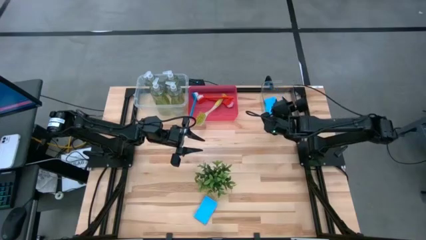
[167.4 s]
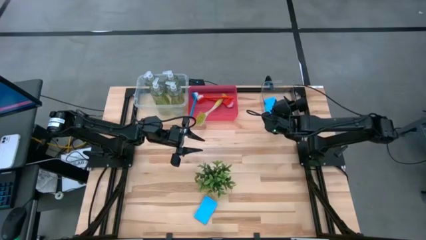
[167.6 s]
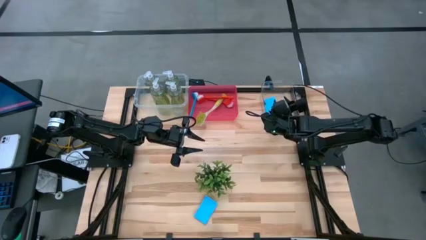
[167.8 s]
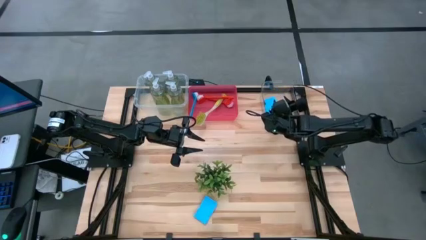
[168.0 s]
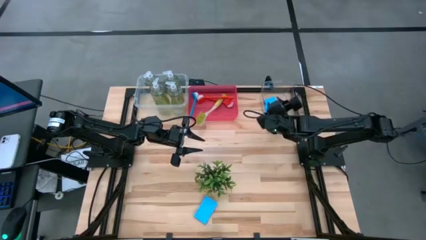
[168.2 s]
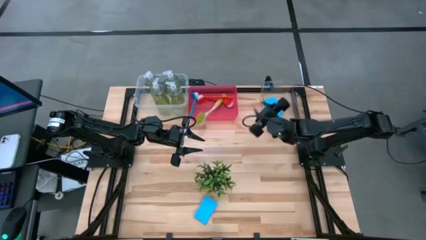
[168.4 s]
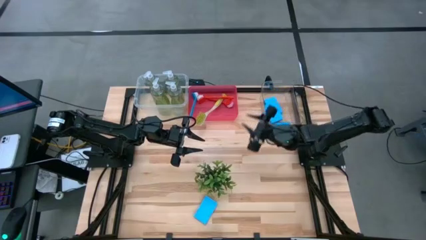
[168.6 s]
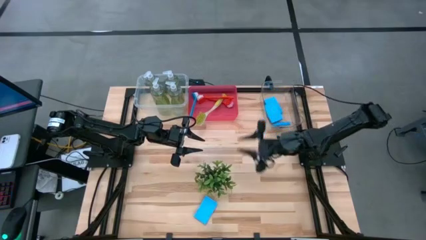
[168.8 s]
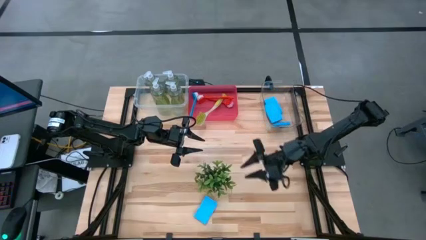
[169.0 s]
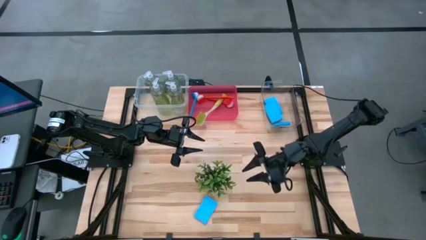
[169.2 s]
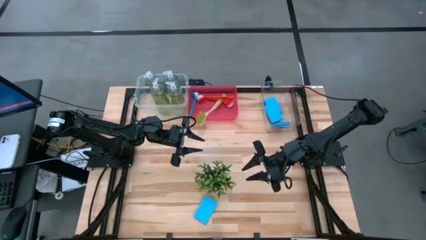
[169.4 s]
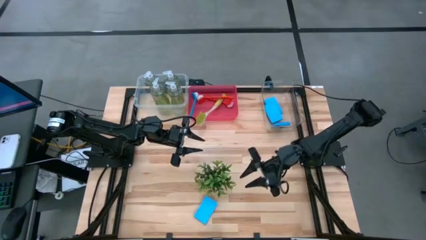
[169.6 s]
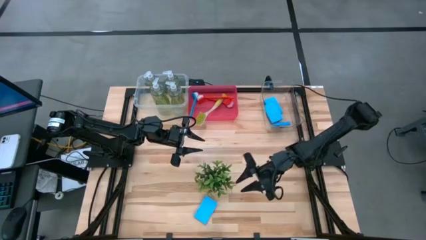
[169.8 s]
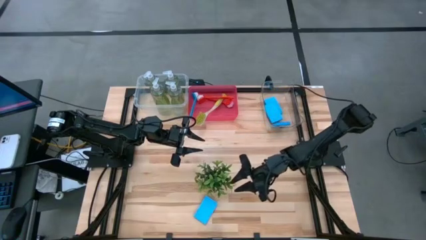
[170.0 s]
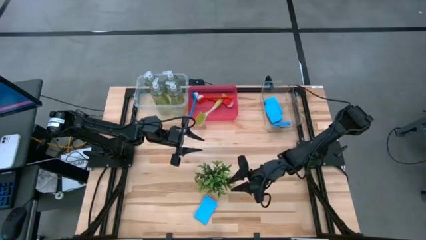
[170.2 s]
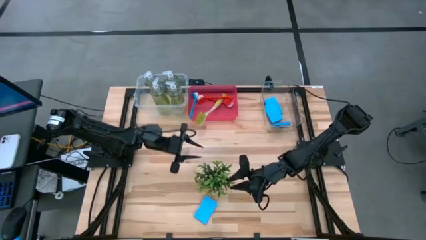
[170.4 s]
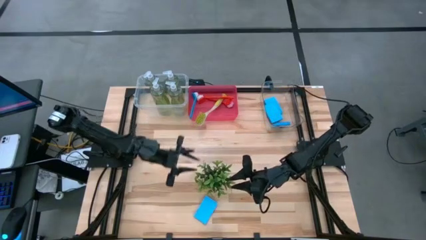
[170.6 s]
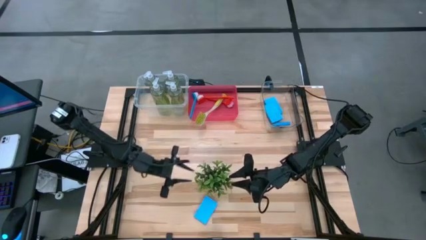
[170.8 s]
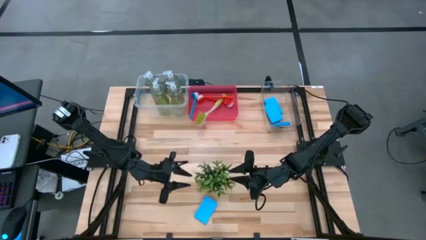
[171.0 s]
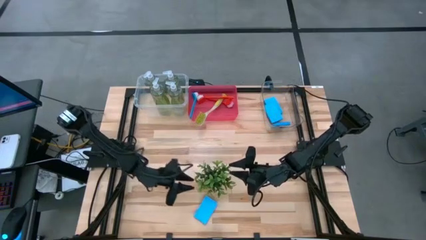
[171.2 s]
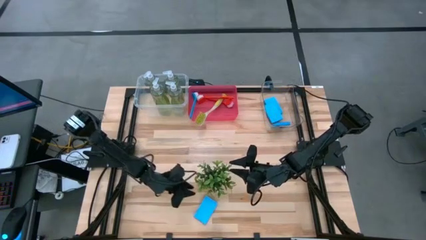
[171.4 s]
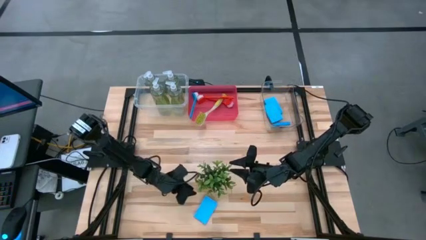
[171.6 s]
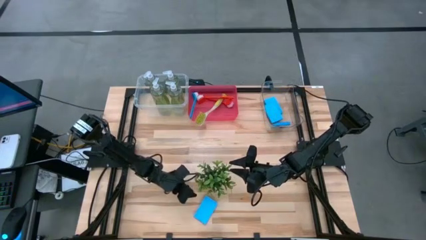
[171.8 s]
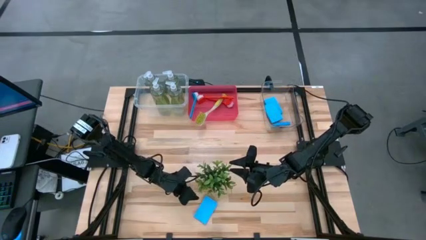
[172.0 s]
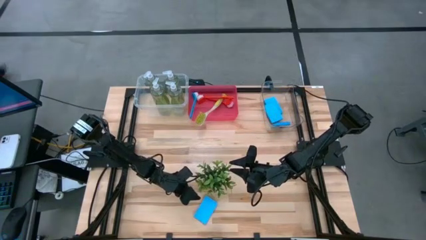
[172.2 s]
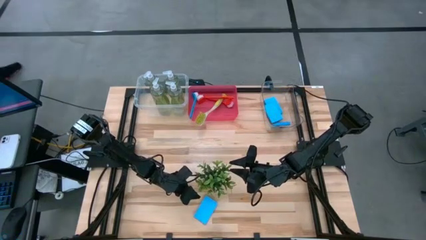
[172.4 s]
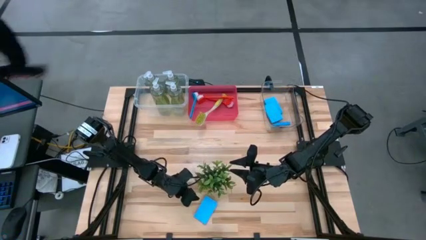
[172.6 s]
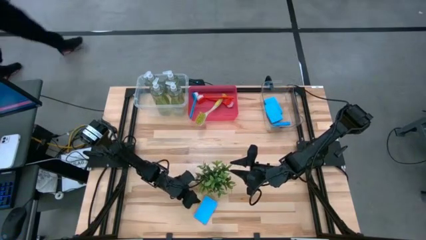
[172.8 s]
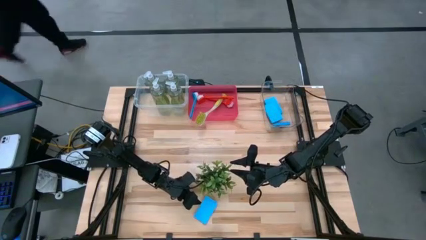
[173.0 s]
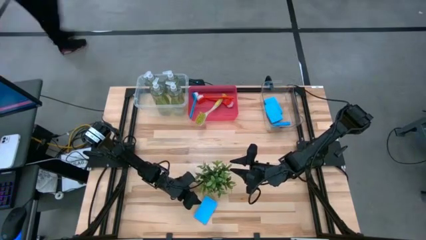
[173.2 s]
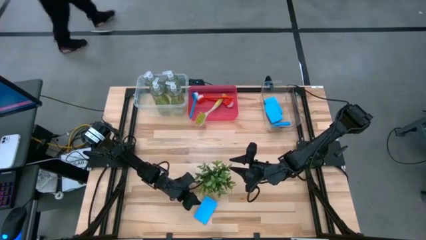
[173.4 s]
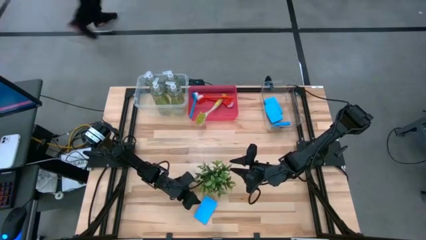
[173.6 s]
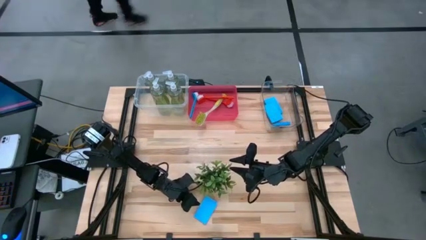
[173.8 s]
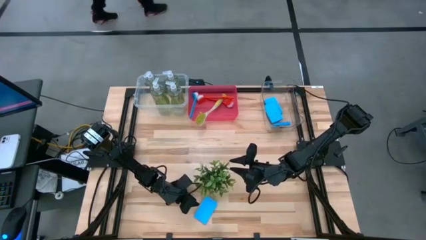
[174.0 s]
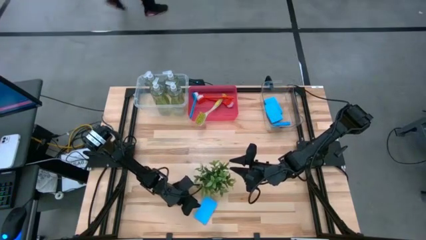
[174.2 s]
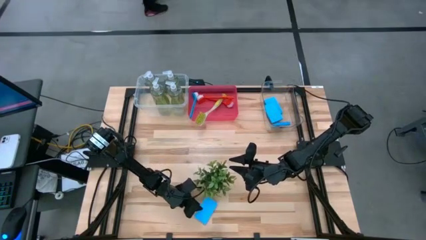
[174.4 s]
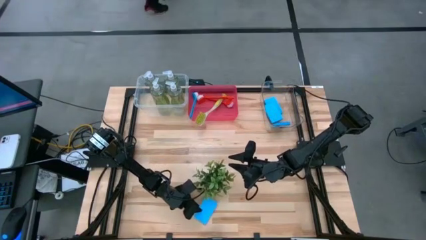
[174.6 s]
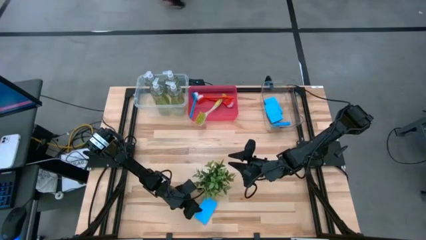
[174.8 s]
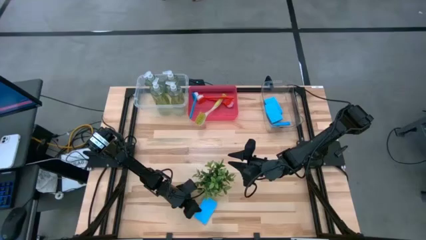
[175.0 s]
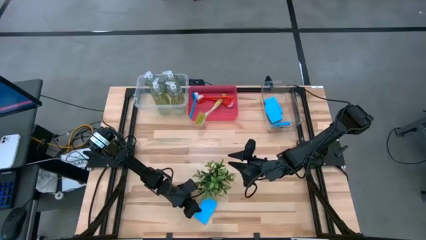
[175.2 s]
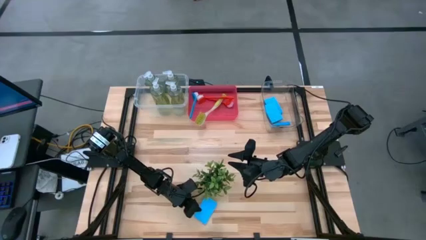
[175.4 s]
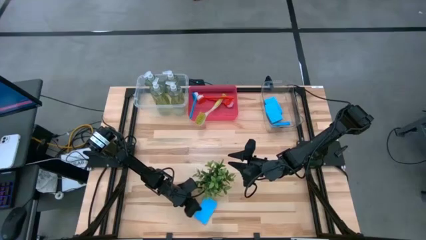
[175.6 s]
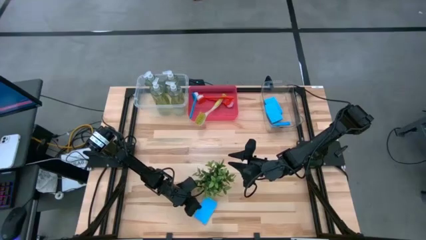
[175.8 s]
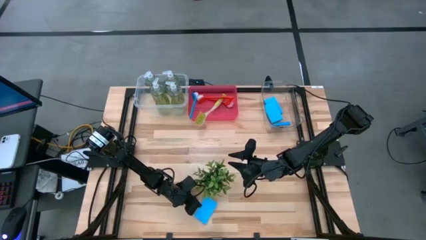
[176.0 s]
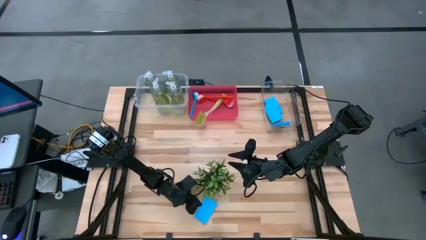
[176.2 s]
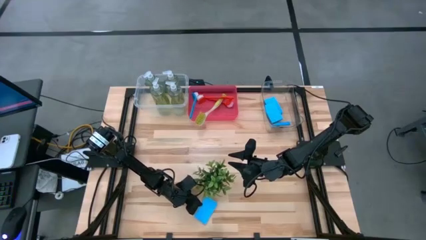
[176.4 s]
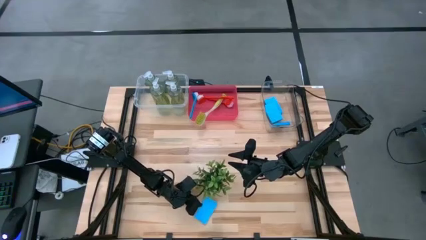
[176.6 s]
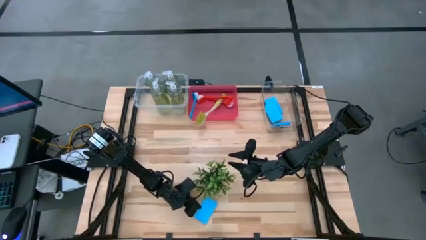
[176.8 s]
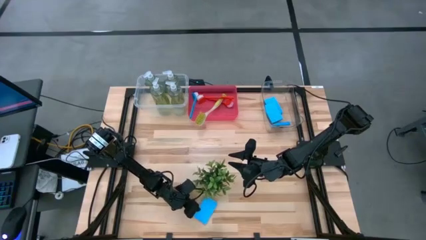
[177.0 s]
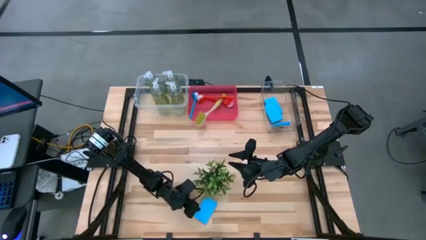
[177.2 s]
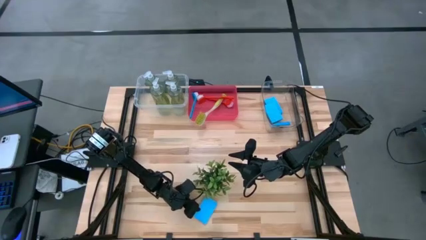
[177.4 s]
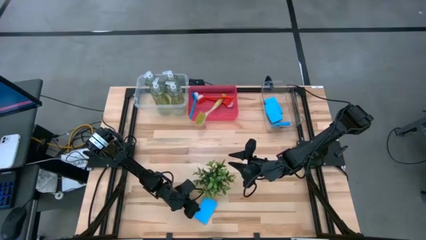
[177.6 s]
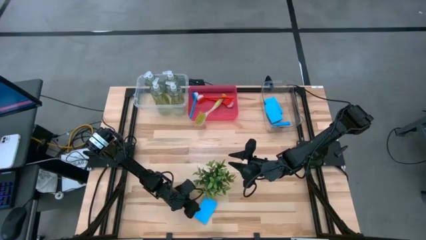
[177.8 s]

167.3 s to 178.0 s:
Task: Pick & Place Kitchen Sink Supplies
Put the blue sponge into the transparent bin

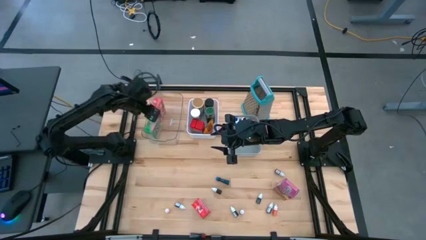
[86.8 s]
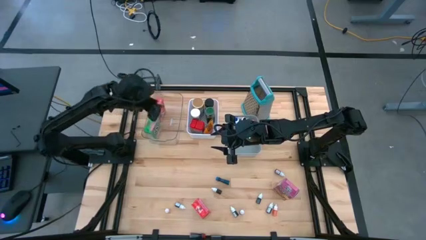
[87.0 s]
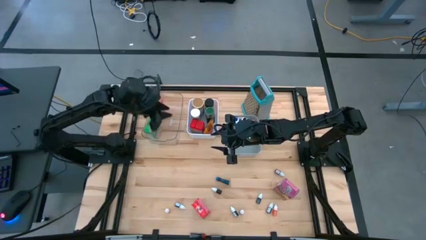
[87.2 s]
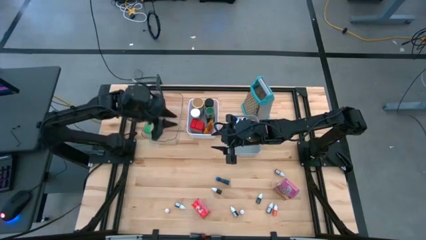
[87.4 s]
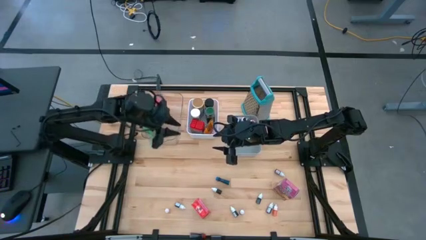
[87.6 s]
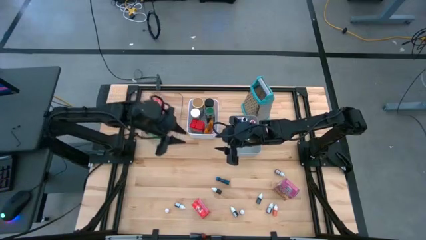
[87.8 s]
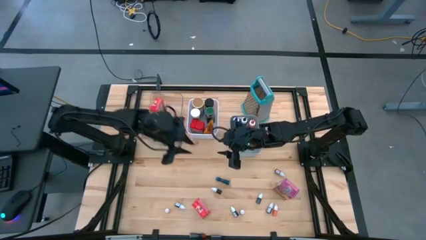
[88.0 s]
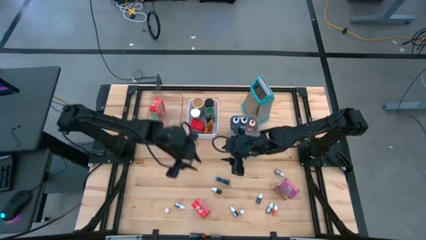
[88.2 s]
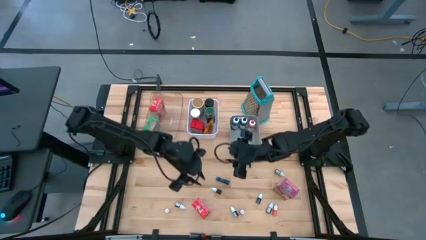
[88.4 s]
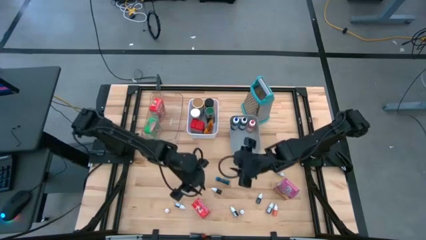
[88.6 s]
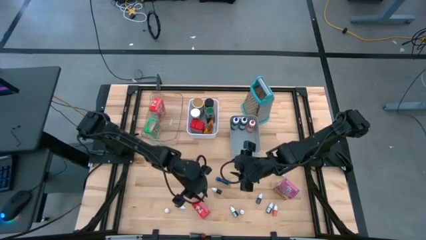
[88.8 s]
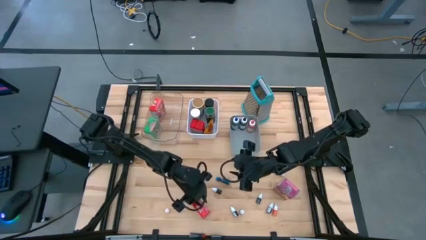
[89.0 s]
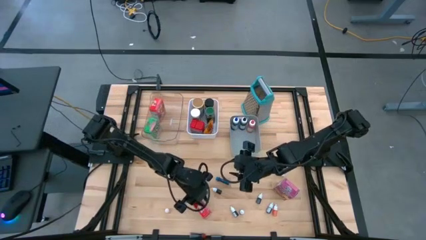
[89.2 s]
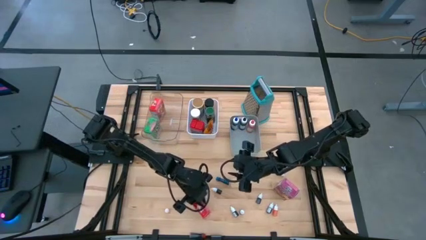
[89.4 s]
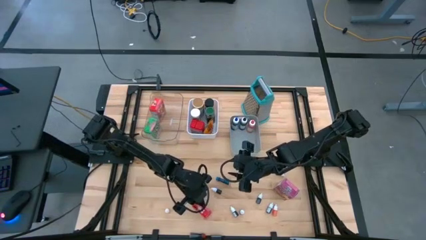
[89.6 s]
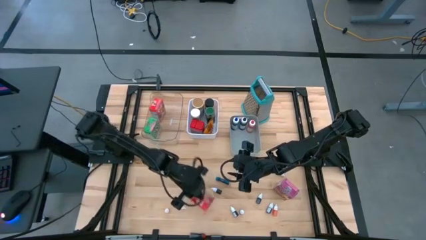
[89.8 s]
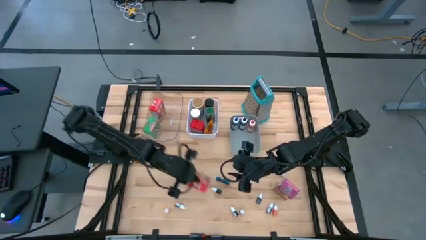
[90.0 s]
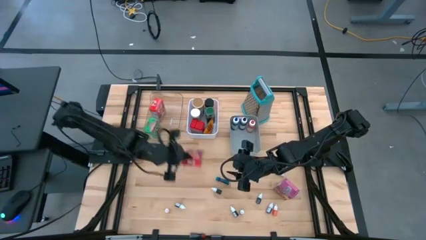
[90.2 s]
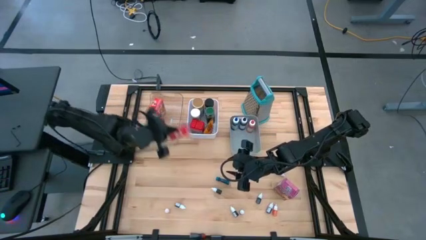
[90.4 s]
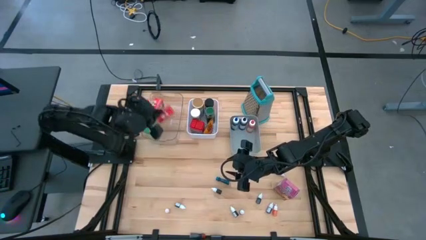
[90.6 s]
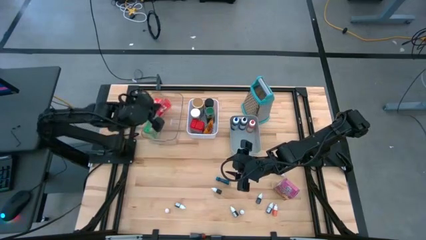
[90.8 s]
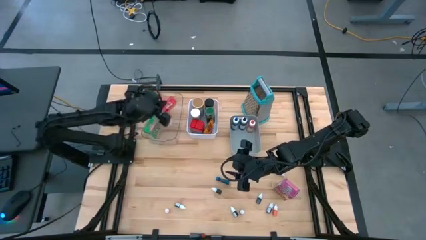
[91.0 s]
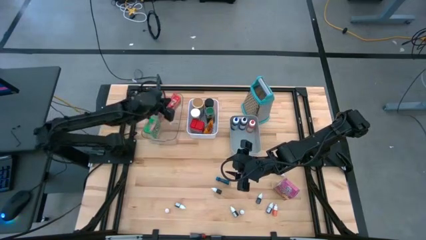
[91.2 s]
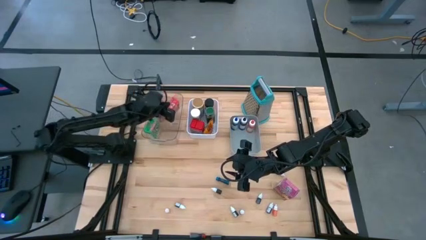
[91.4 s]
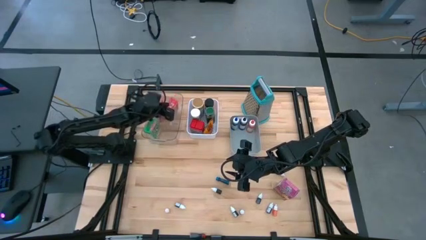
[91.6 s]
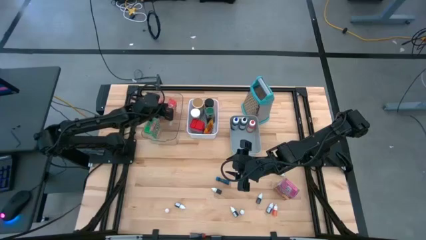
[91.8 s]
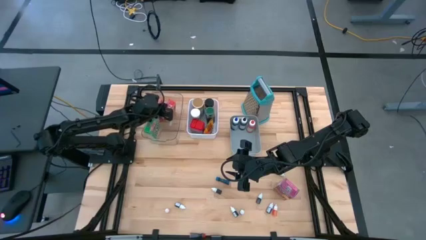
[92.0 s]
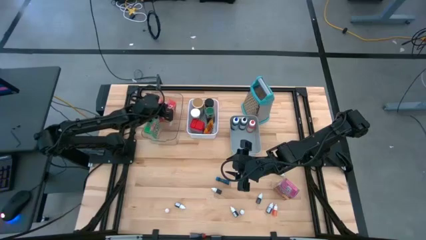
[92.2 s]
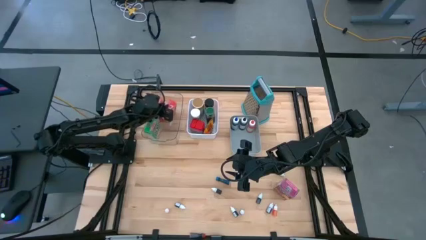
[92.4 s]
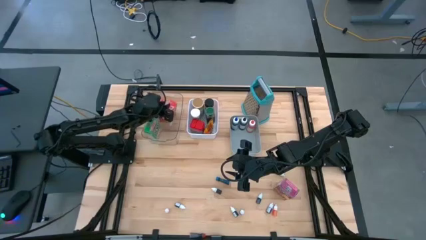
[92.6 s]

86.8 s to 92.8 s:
Task: Pick & Place Kitchen Items
Put the red cereal box into the transparent bin
